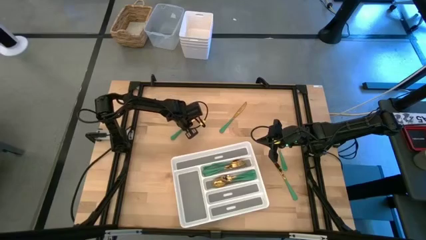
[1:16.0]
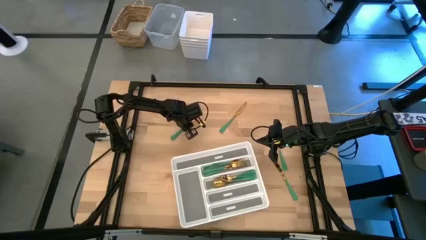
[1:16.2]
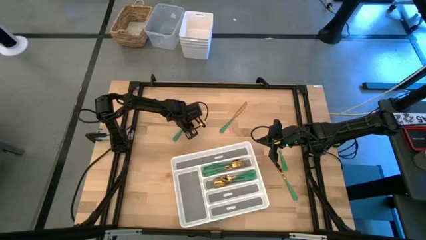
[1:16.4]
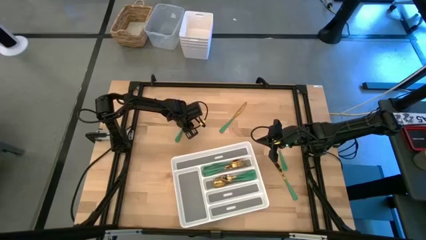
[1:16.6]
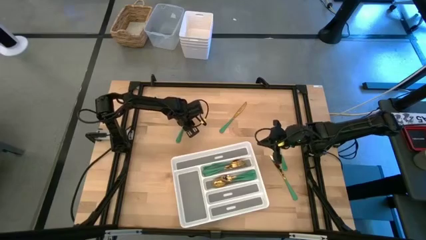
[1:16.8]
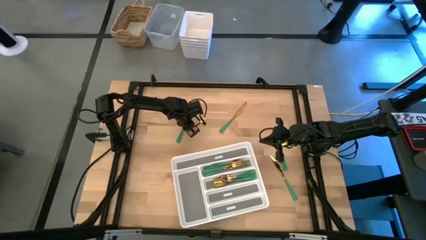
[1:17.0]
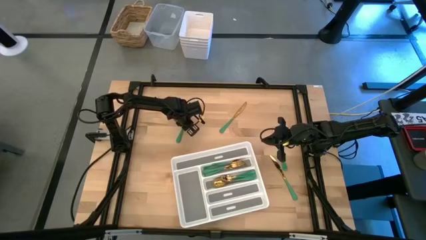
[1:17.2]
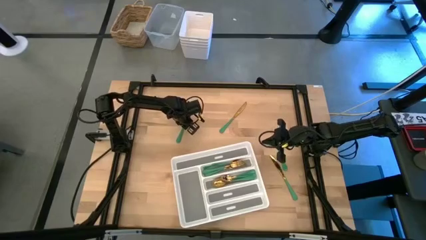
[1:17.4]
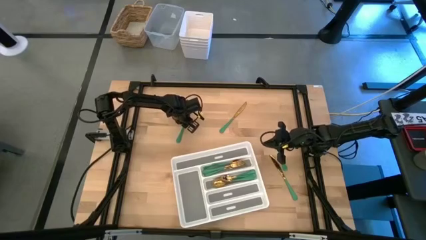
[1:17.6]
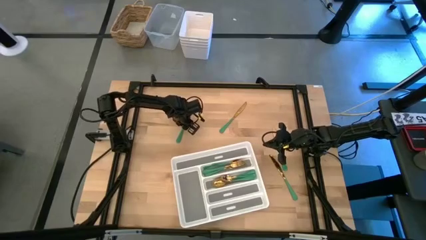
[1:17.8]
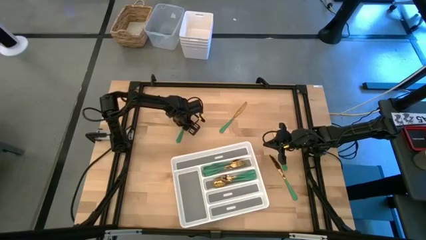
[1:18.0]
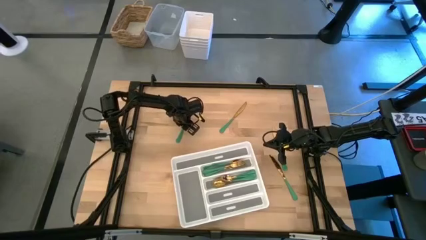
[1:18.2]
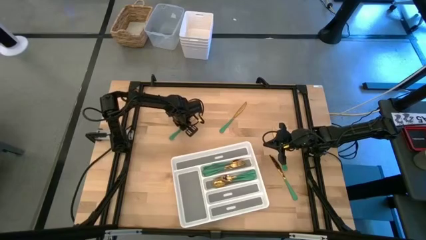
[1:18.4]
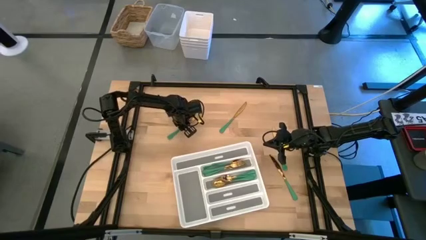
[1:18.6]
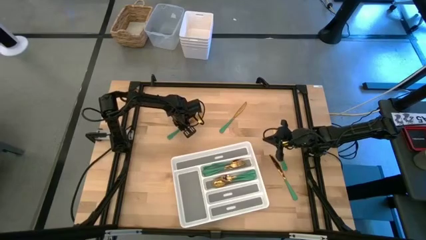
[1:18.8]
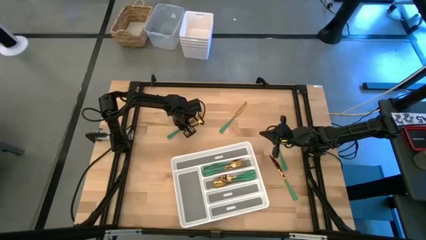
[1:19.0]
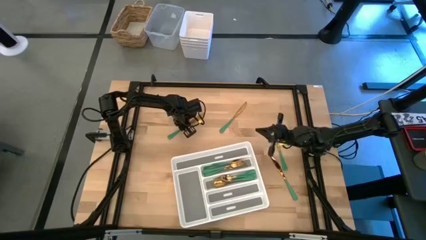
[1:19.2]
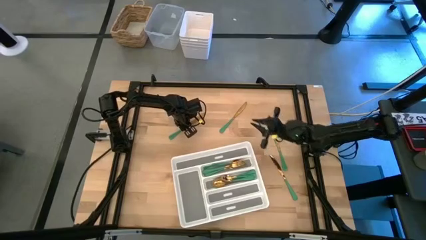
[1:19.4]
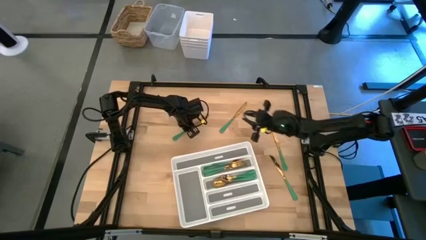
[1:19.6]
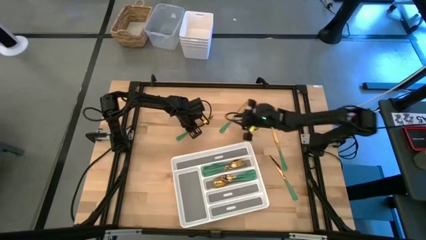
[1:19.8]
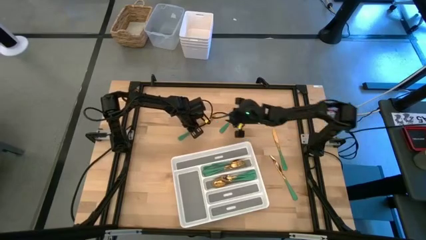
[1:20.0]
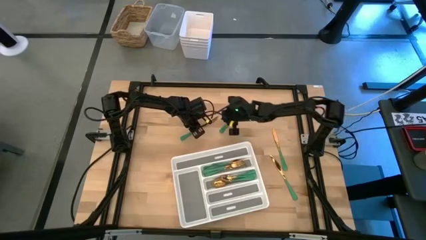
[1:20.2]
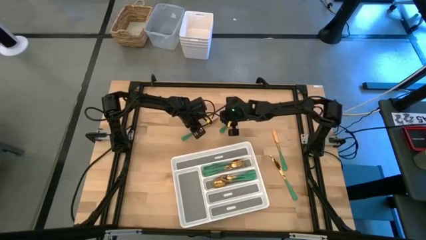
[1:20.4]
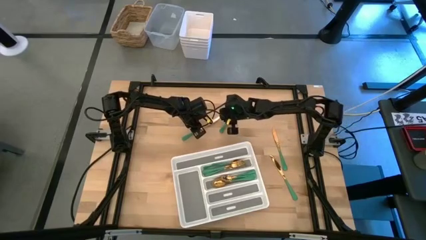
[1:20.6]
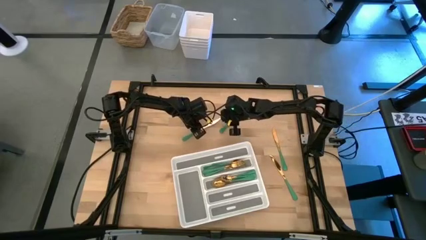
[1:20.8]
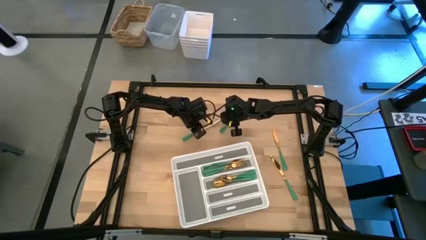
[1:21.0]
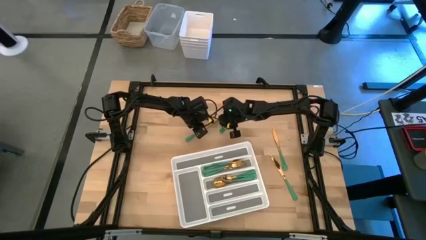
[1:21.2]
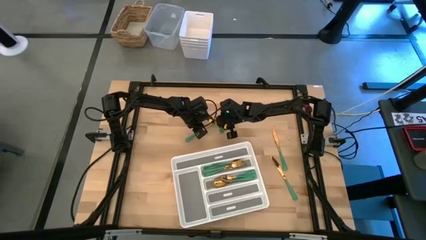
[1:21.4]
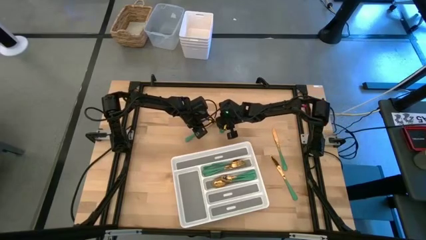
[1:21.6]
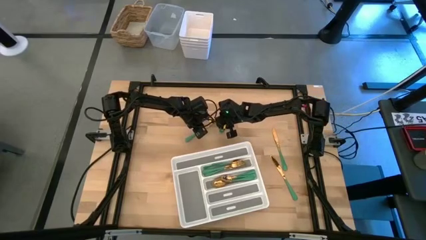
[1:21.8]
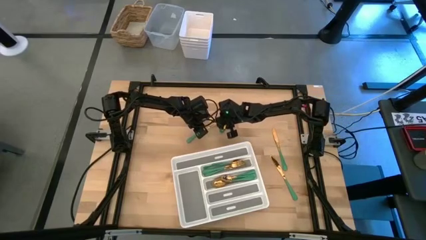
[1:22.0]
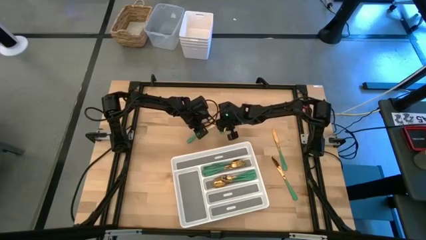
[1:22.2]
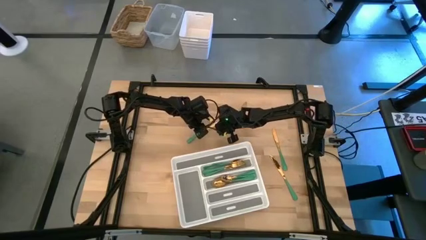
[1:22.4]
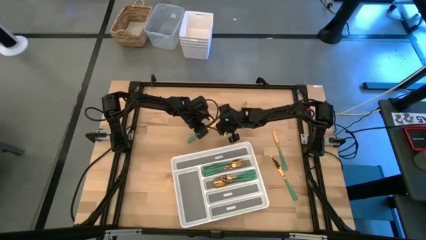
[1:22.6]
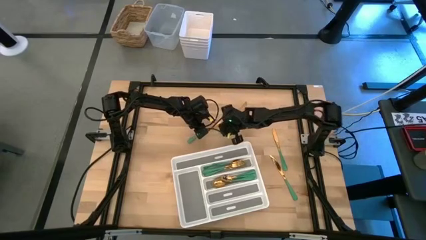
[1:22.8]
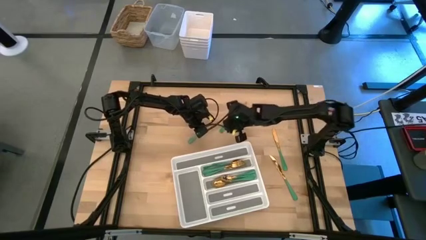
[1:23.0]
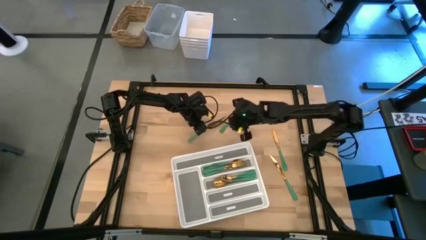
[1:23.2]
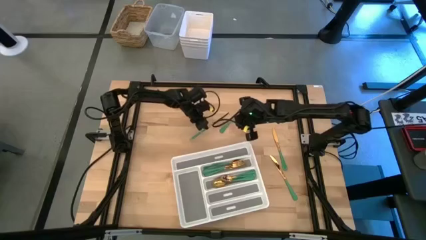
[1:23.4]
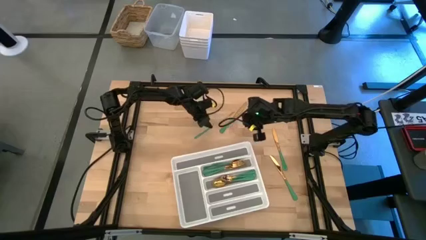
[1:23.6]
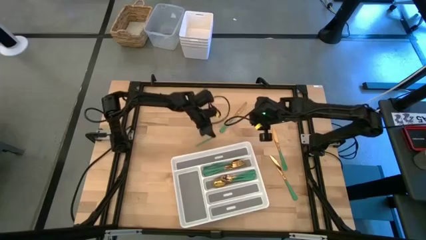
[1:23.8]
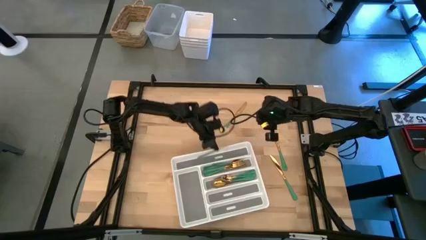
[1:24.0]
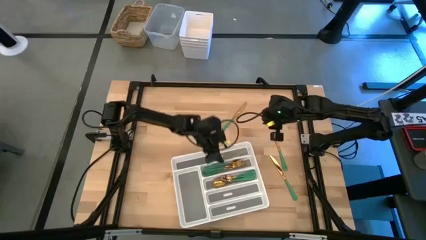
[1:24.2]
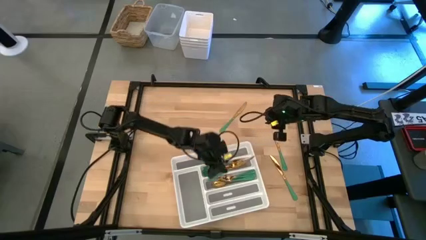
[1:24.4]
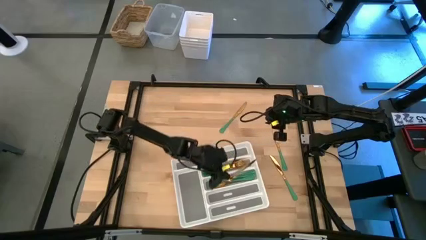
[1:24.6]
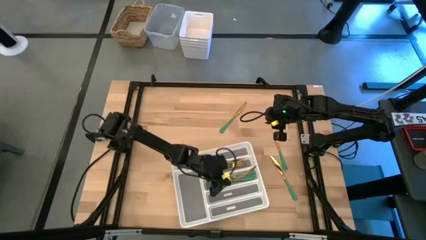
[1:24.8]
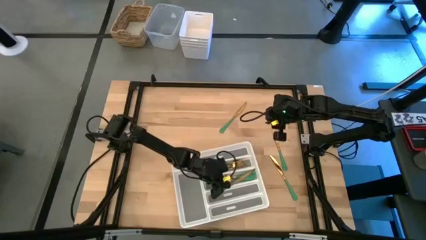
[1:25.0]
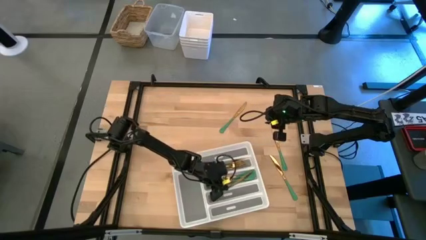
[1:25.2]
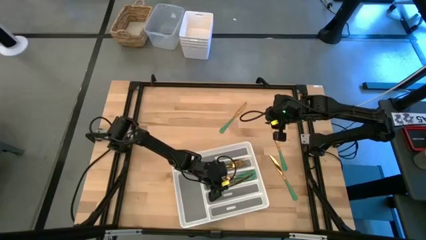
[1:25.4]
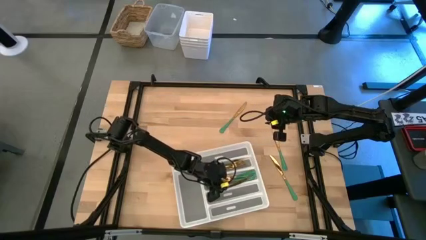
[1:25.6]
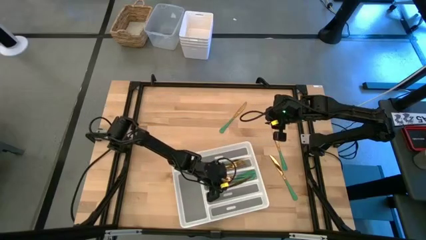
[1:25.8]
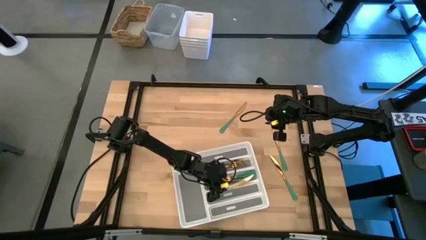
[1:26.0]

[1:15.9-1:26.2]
Task: Sort silverware
Put the green knife into the white silverware tray

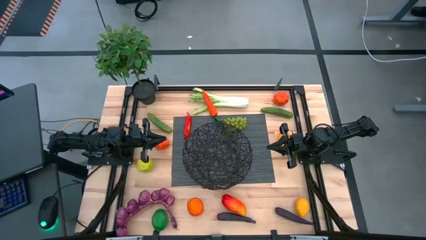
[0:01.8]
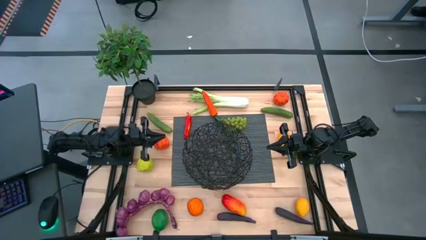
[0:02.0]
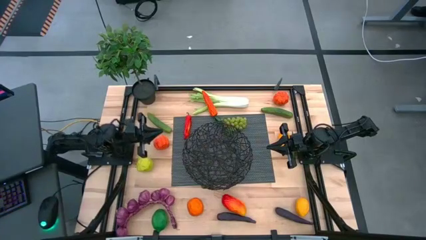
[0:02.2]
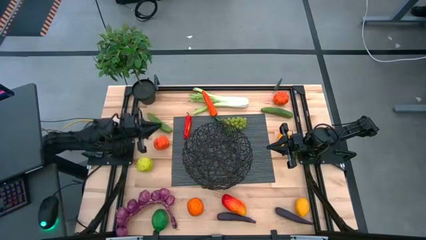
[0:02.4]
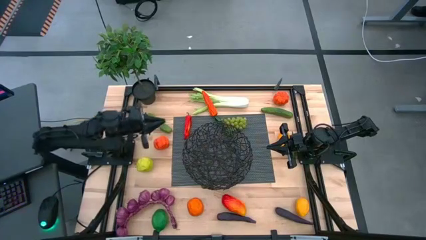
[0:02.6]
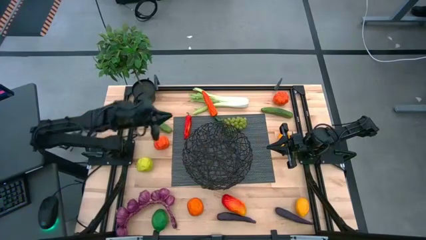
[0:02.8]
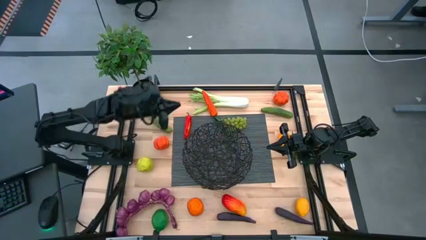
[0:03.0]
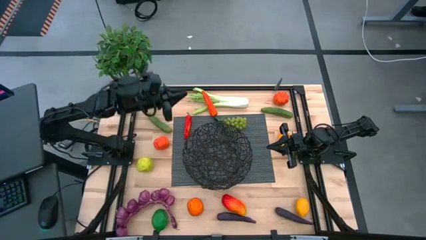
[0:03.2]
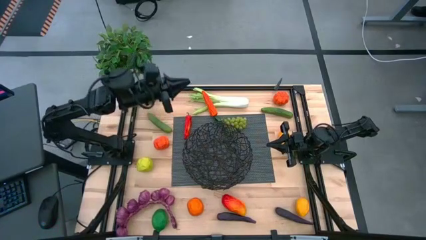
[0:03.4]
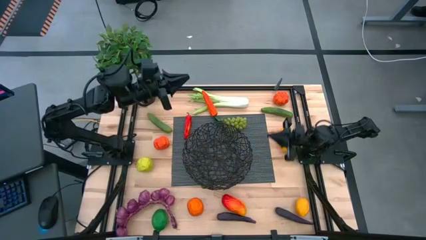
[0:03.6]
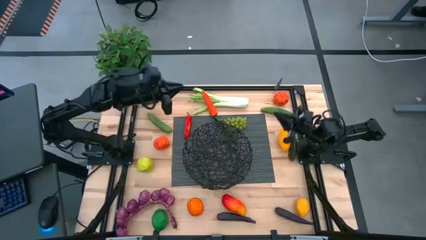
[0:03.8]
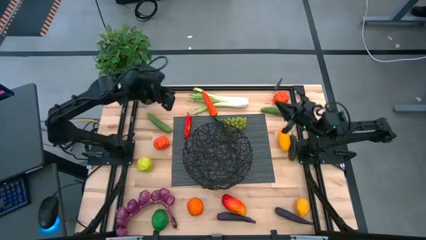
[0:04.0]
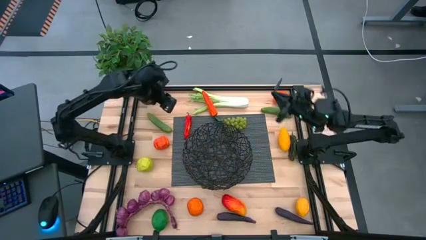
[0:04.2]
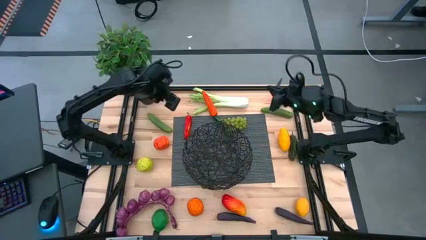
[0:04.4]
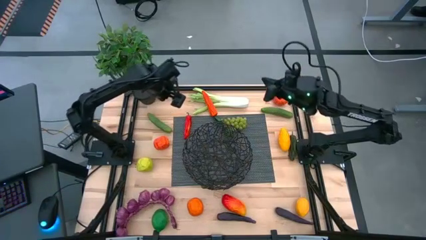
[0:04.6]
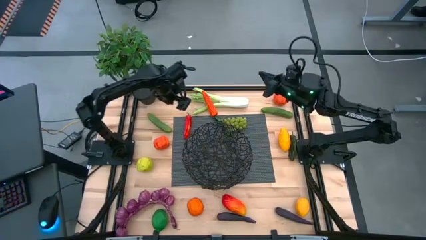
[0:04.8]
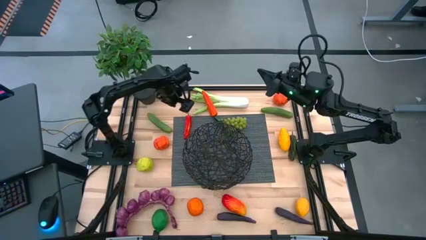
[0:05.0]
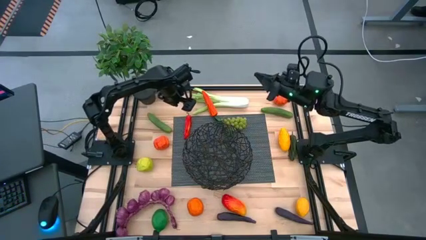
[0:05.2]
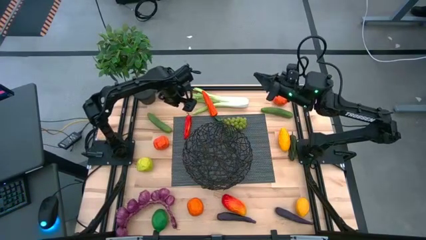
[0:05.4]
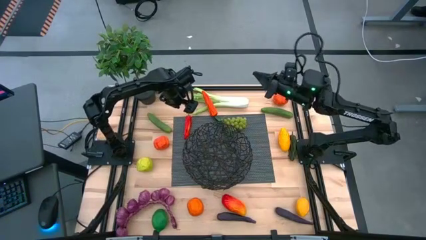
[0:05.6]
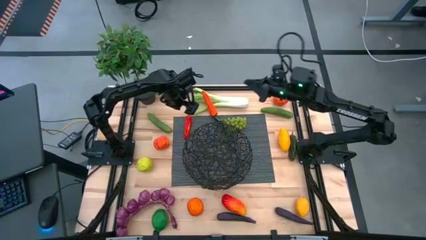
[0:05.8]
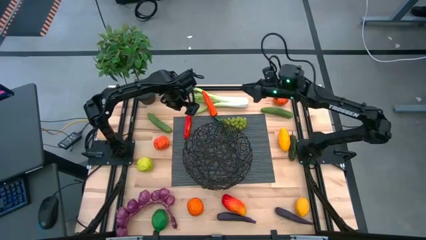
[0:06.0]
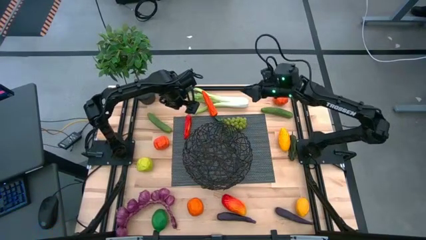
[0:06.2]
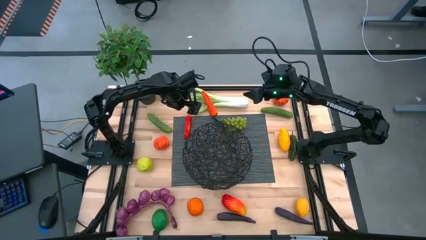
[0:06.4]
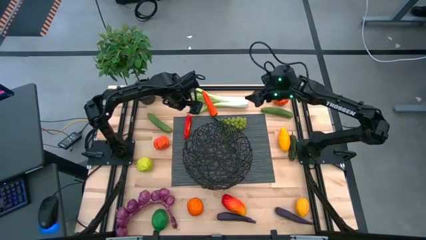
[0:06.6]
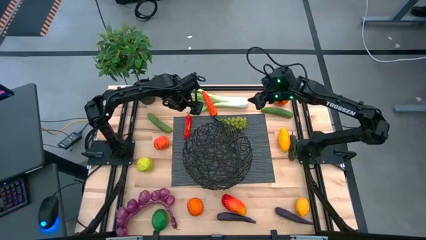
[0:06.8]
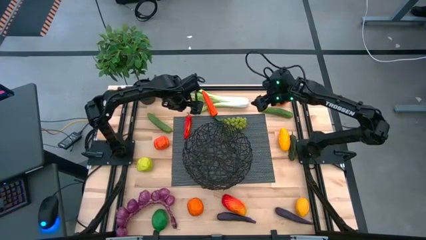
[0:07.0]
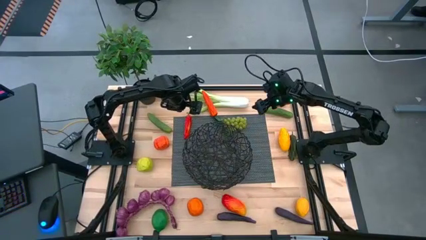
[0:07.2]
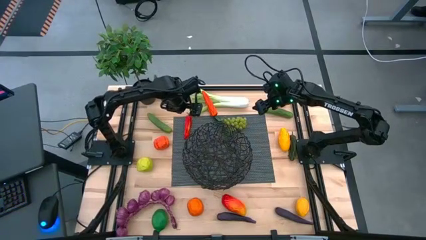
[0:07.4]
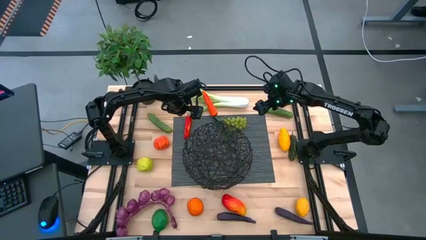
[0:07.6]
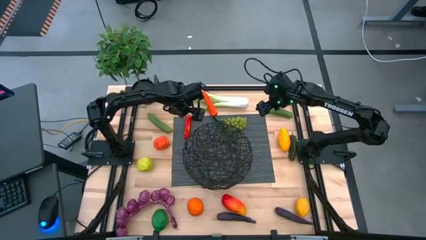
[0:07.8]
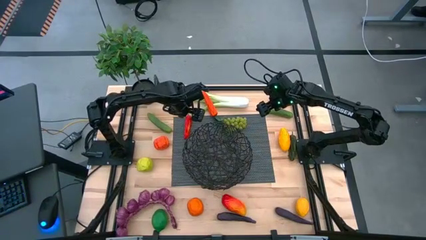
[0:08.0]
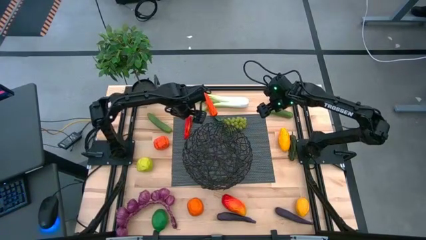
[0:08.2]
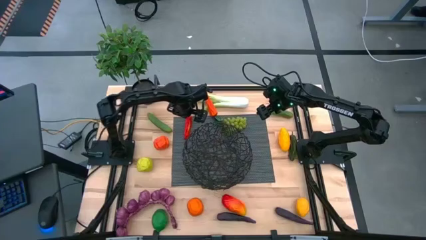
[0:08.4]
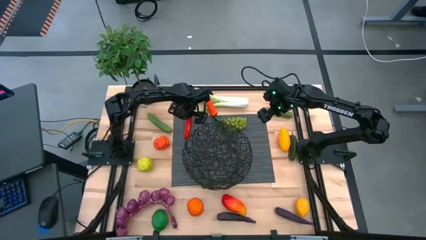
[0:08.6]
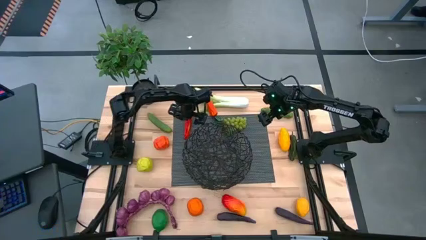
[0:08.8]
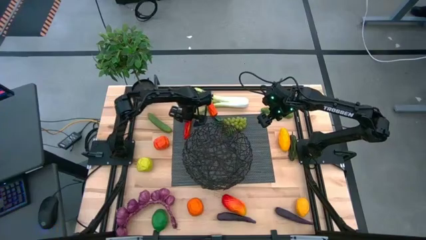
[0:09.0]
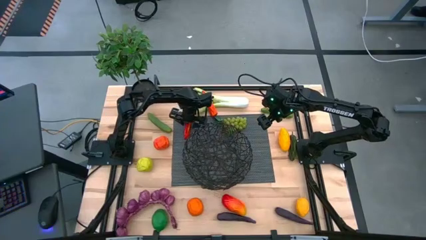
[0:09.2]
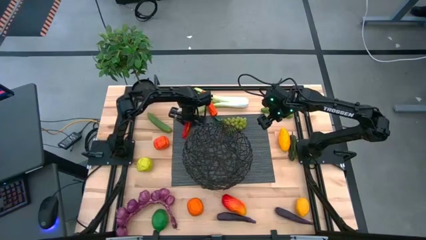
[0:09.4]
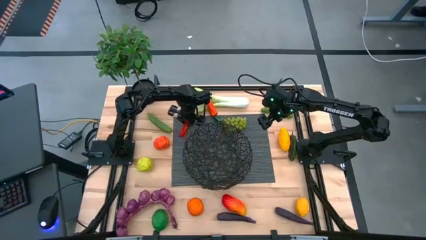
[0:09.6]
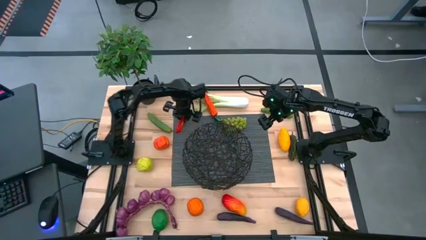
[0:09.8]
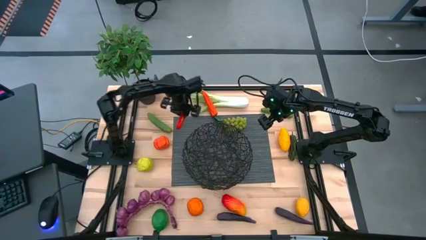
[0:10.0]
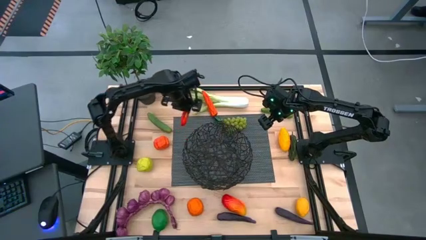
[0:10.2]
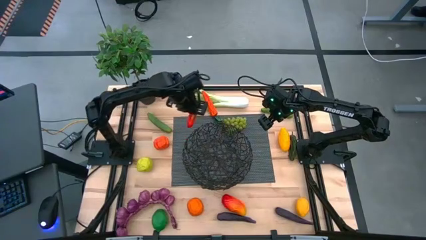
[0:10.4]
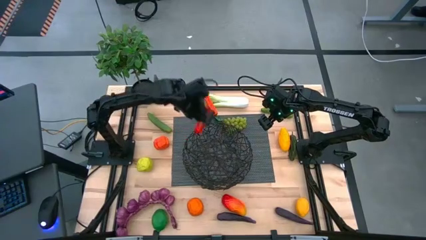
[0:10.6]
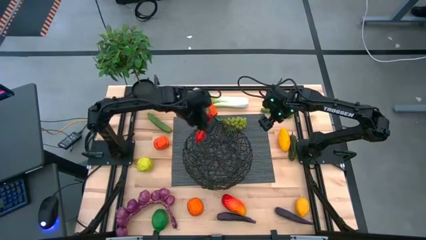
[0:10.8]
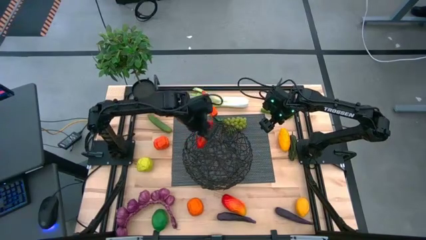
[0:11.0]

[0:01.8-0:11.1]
Task: Build produce basket
Put the red chili pepper into the black wire basket
